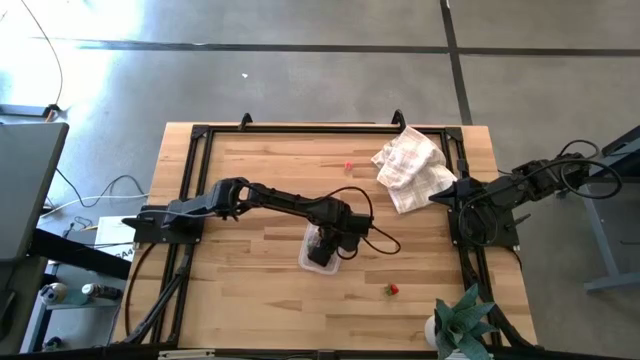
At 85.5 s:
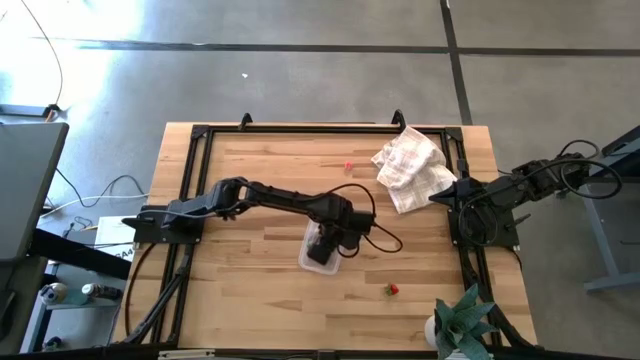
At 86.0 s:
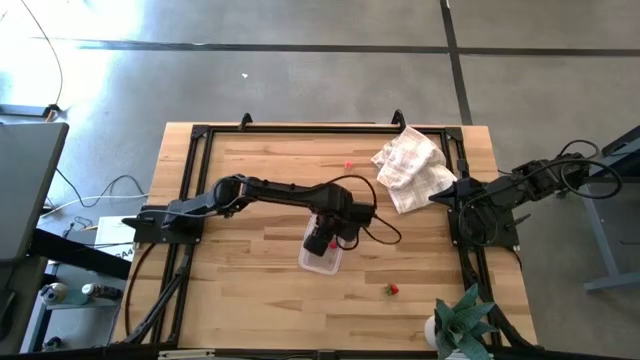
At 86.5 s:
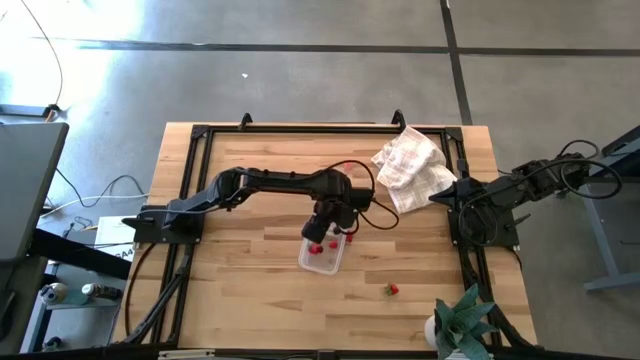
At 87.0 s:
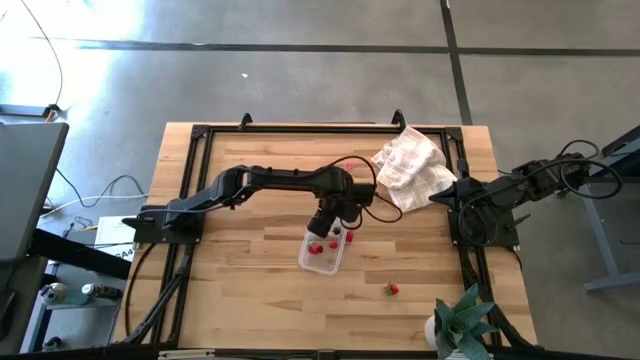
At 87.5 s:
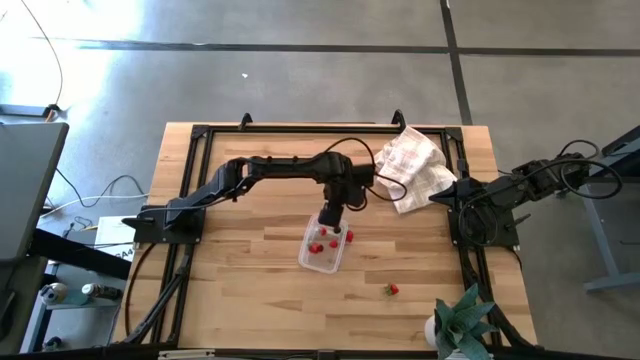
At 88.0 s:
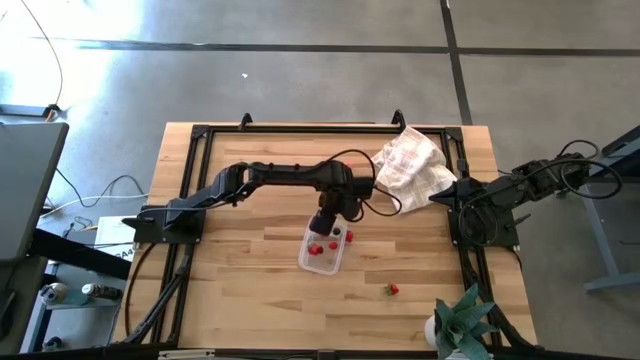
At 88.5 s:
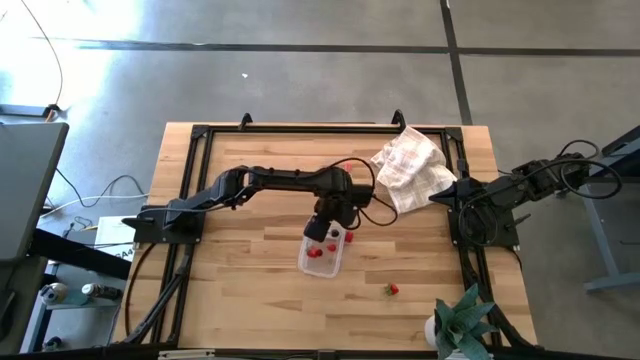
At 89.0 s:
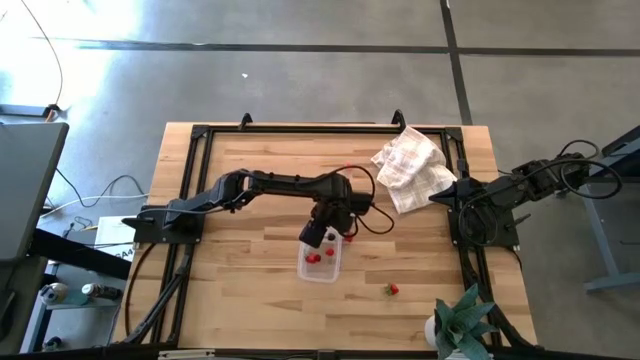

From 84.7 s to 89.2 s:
Task: Pick and placing Produce into tupperware
Adjust the transparent container

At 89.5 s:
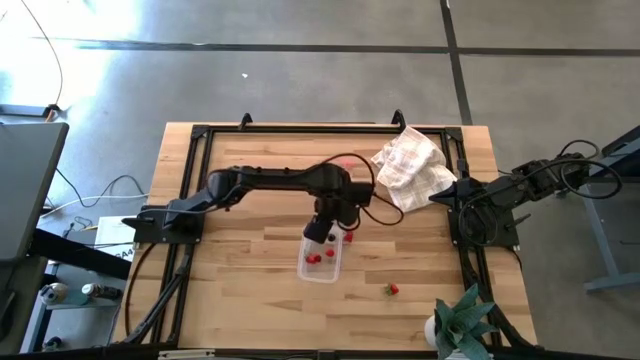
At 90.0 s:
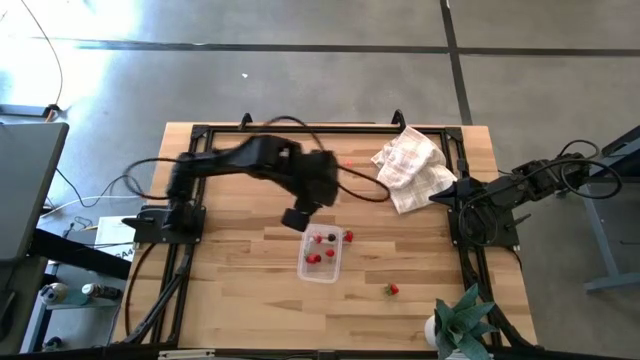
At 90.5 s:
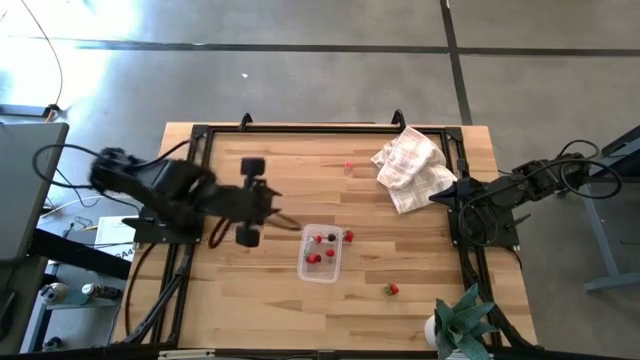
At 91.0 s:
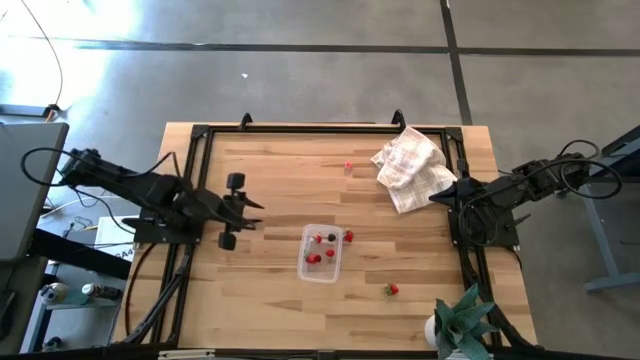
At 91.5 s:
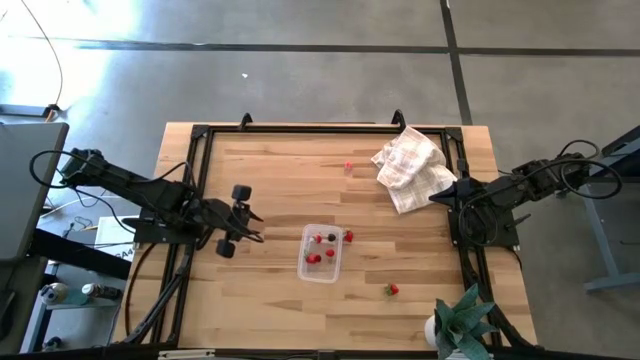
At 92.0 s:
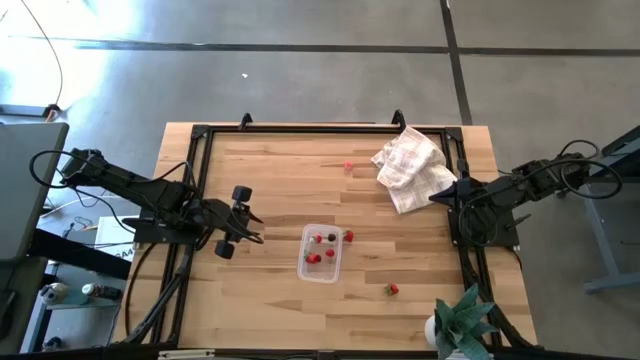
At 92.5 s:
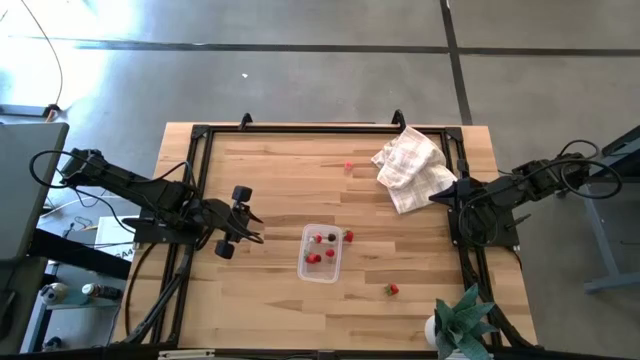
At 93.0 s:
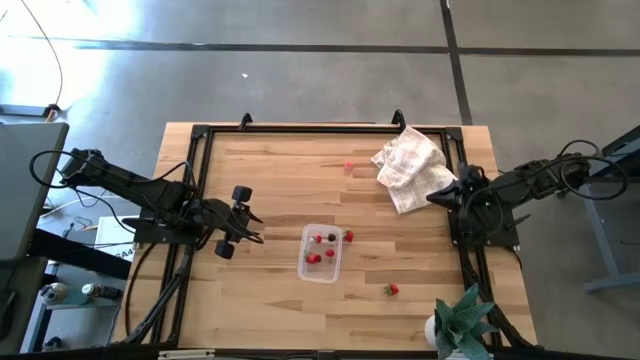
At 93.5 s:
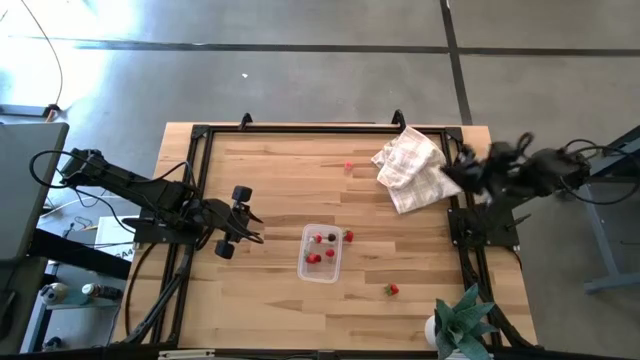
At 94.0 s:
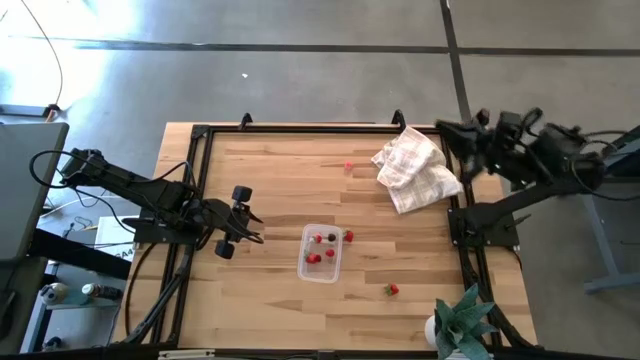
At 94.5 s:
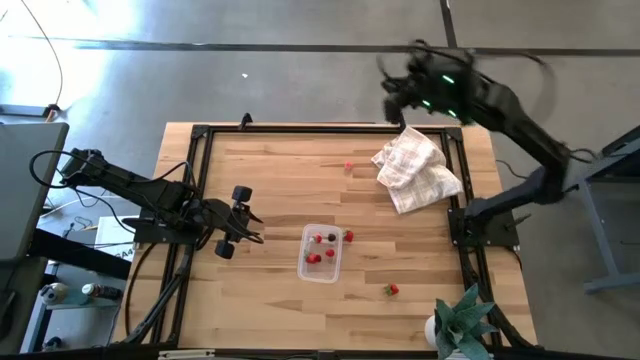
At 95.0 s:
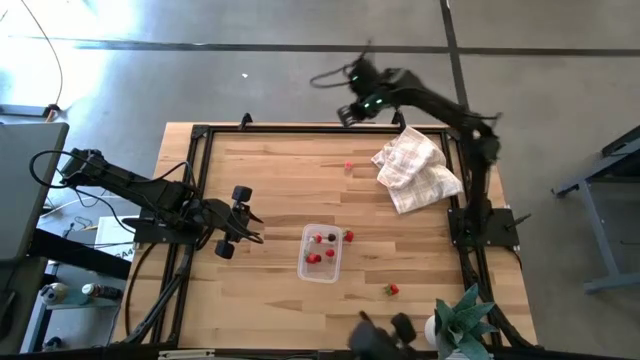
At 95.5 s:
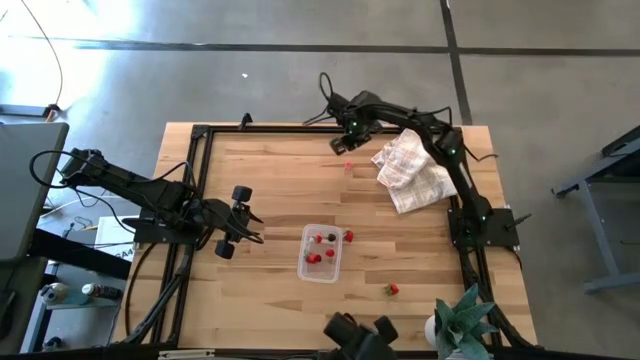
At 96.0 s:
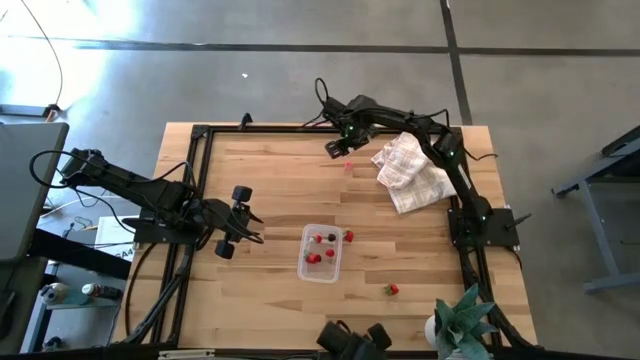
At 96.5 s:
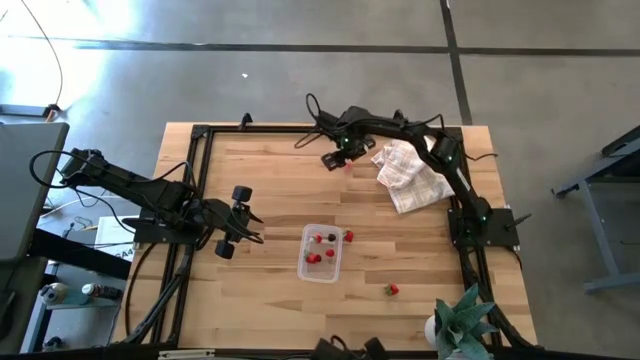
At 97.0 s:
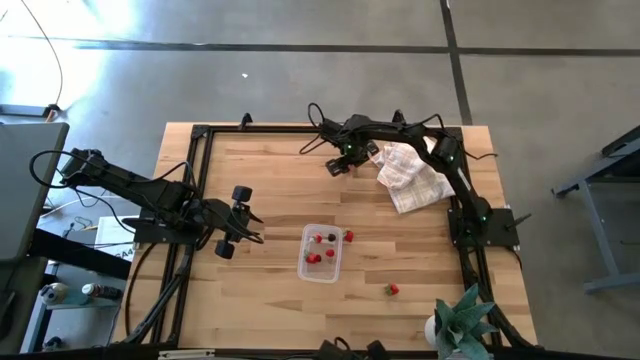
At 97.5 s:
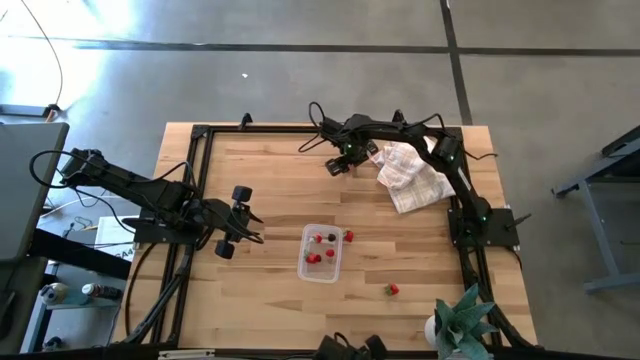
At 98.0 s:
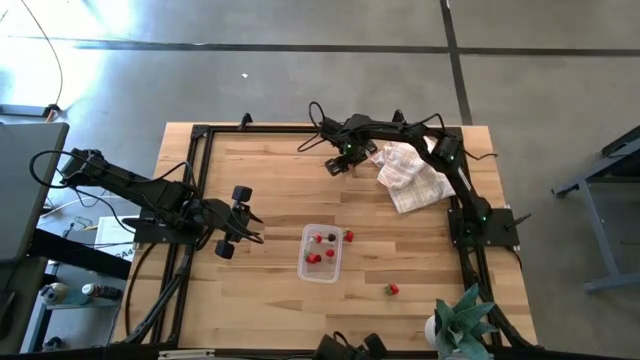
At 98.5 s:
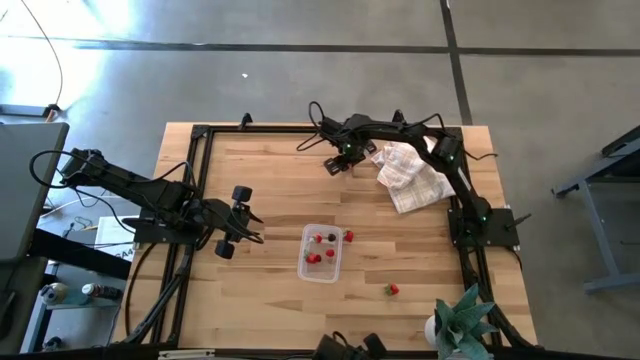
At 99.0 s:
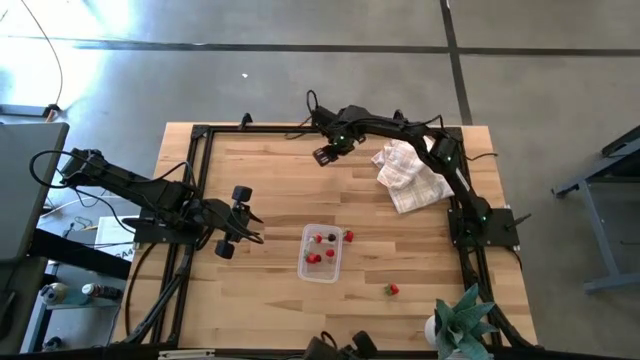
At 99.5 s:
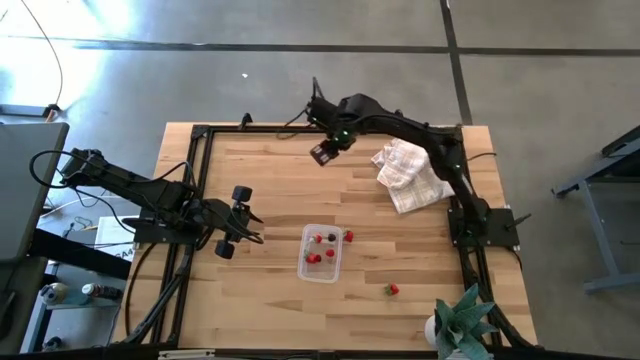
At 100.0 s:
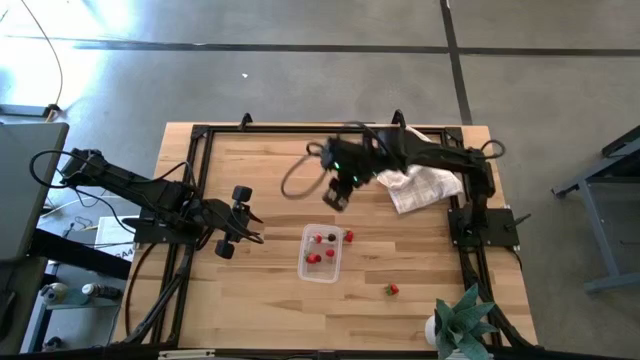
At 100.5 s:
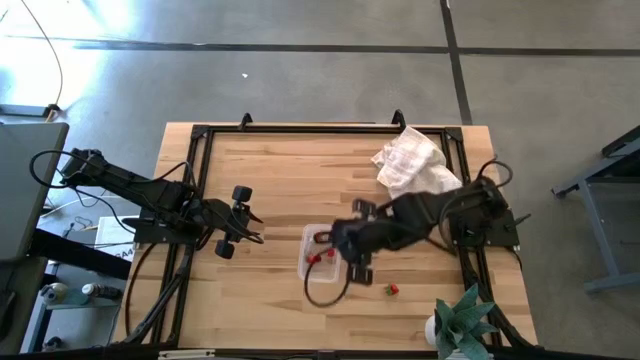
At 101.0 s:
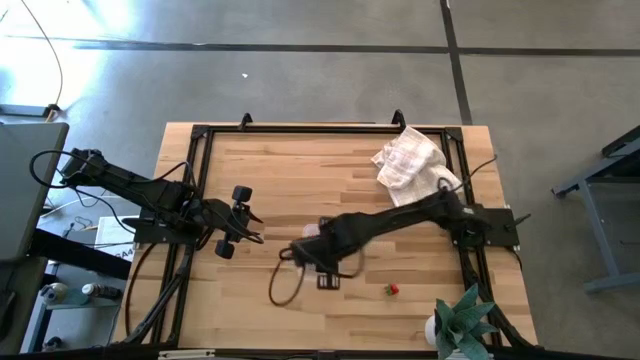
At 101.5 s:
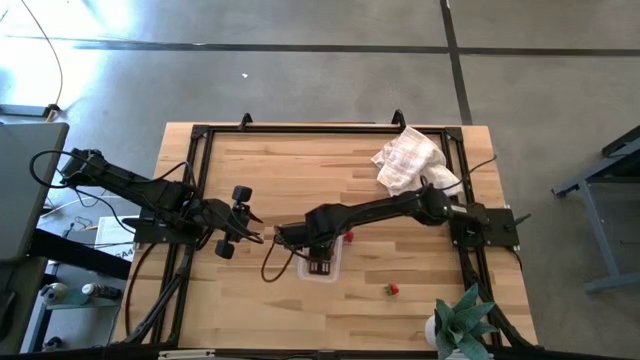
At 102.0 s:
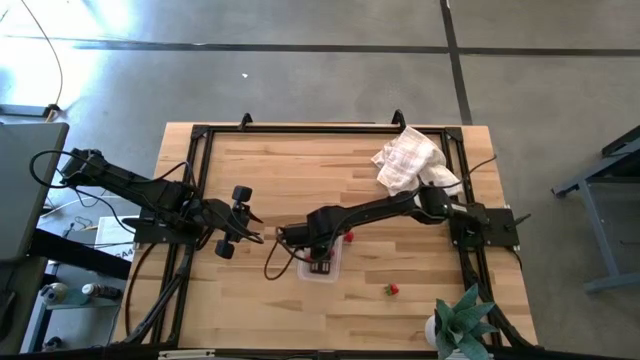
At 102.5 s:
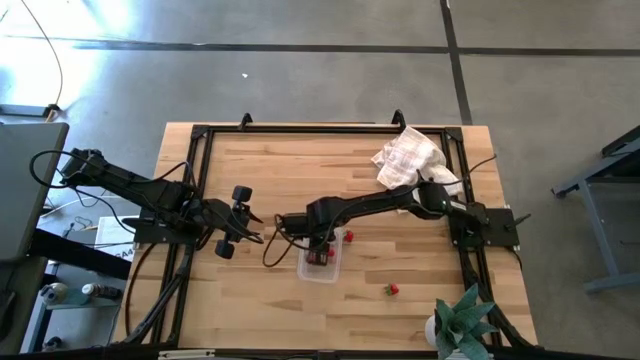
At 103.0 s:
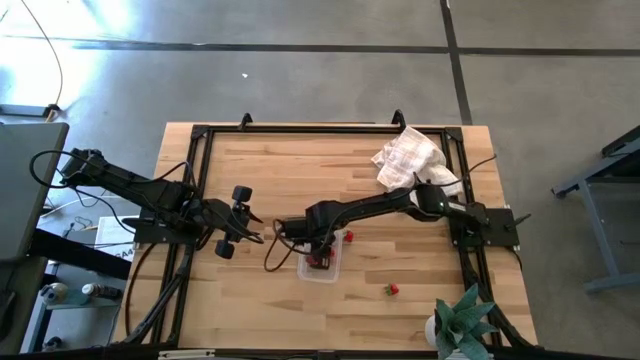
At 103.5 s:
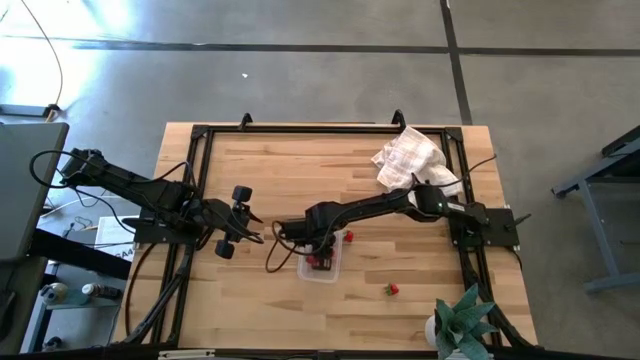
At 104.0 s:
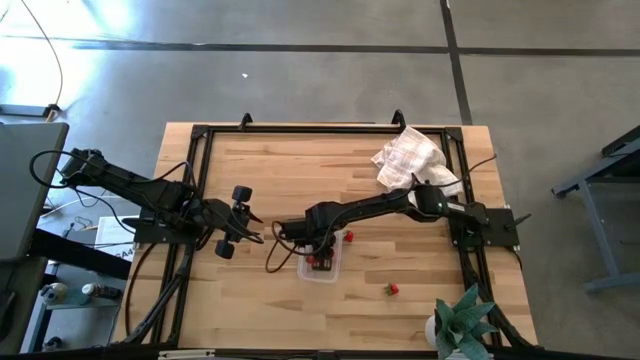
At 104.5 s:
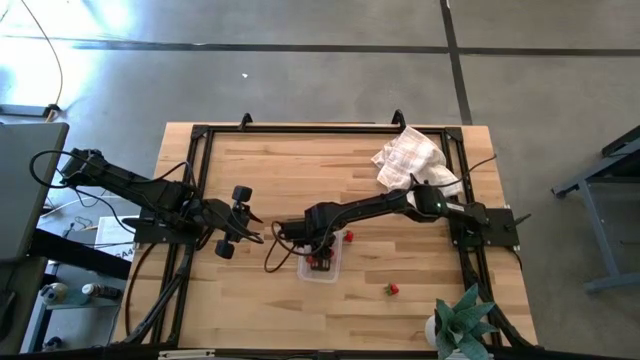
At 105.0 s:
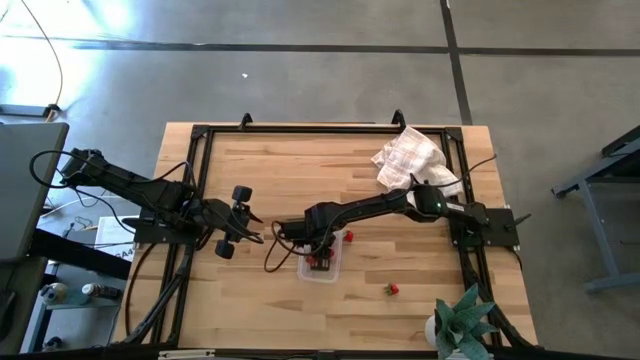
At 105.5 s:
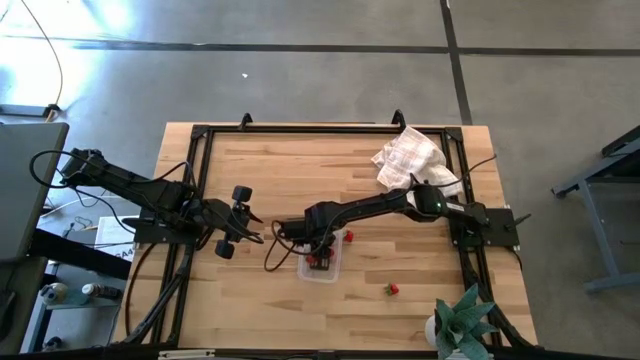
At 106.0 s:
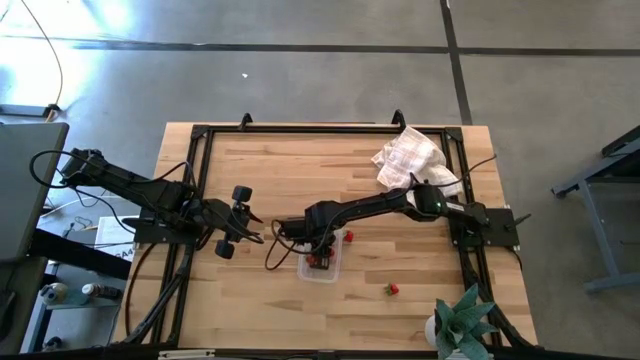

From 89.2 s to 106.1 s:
Put the pink peach into the transparent container
